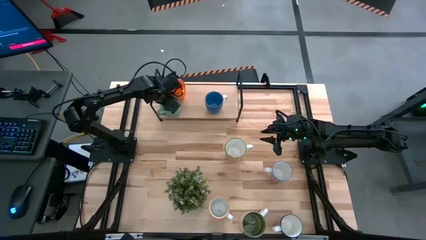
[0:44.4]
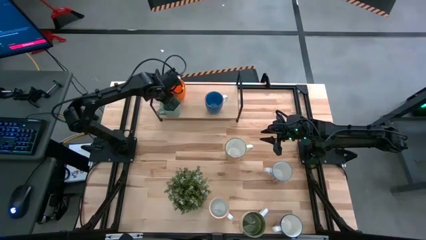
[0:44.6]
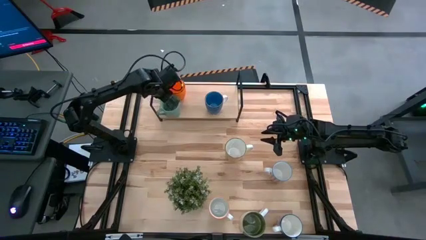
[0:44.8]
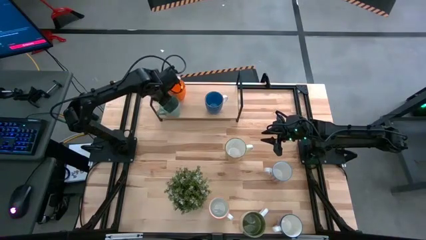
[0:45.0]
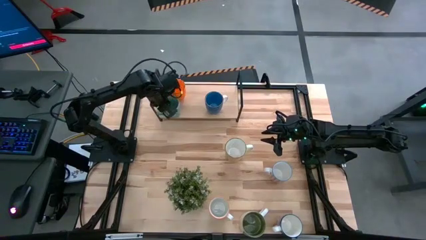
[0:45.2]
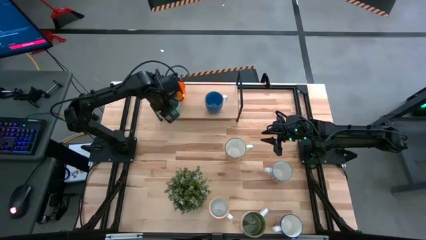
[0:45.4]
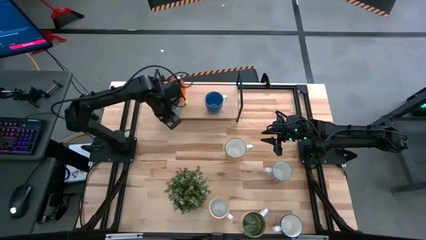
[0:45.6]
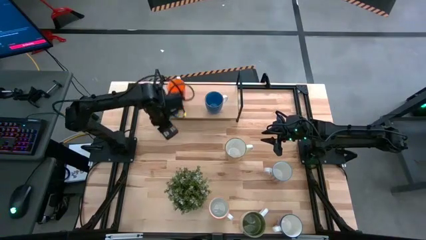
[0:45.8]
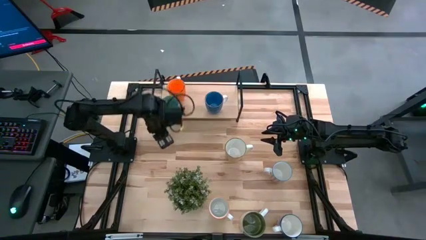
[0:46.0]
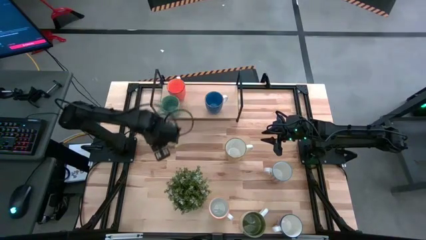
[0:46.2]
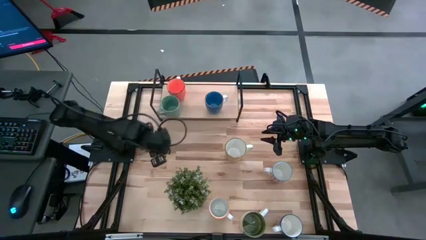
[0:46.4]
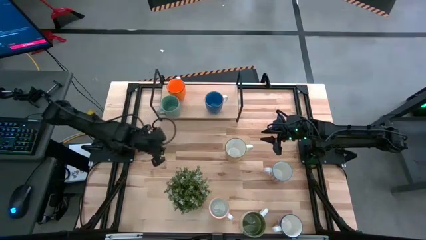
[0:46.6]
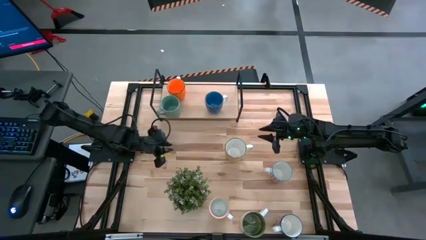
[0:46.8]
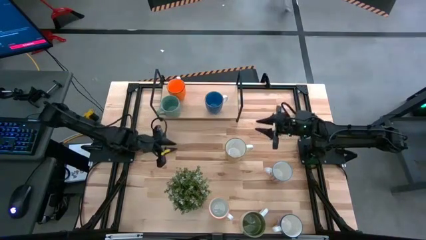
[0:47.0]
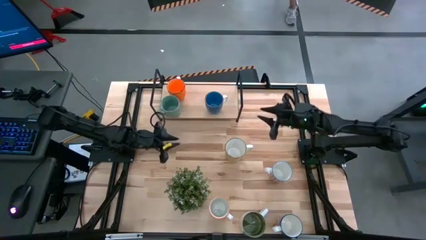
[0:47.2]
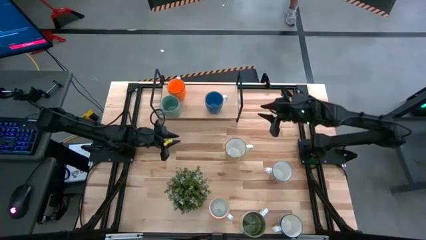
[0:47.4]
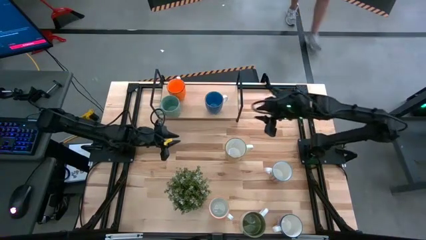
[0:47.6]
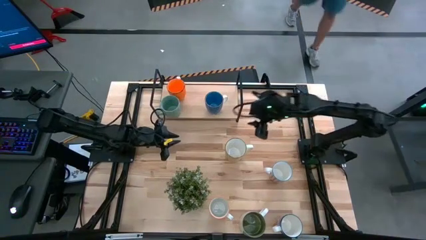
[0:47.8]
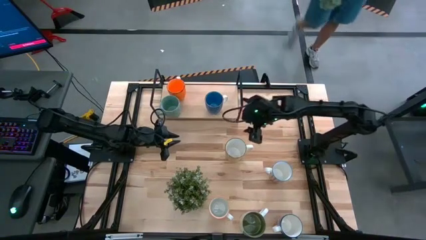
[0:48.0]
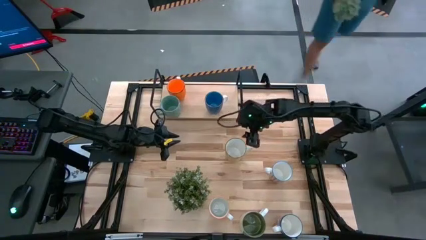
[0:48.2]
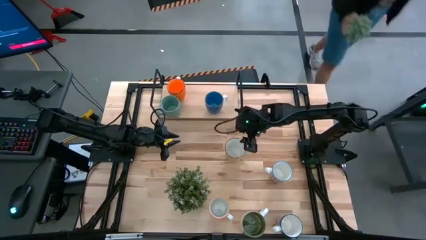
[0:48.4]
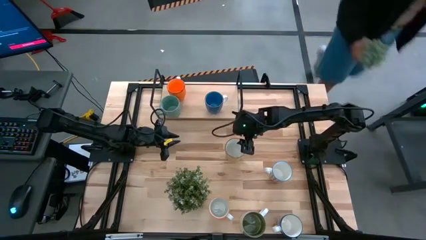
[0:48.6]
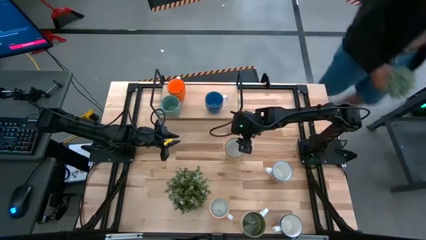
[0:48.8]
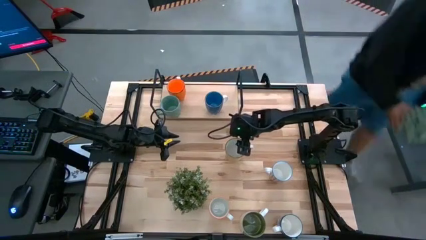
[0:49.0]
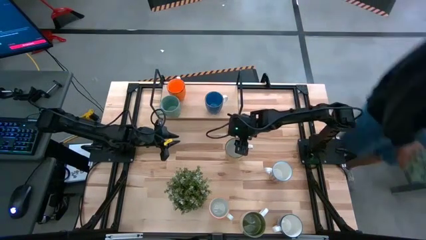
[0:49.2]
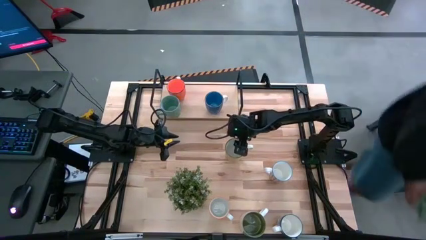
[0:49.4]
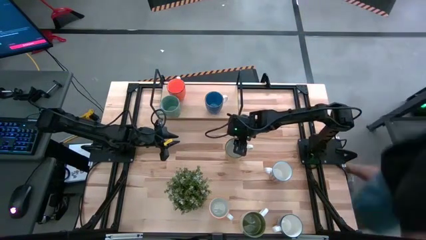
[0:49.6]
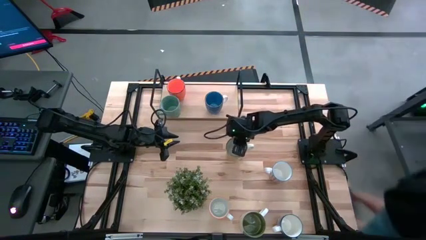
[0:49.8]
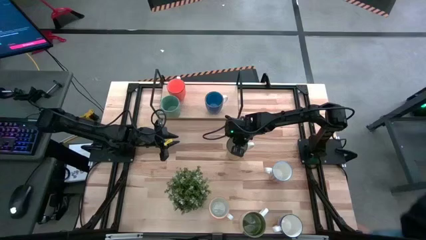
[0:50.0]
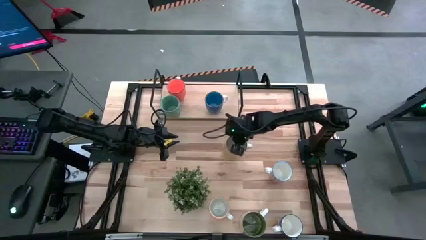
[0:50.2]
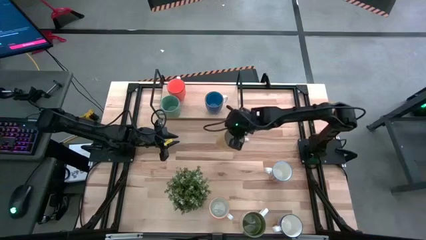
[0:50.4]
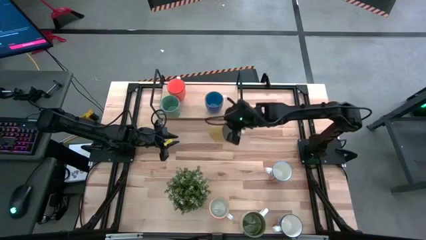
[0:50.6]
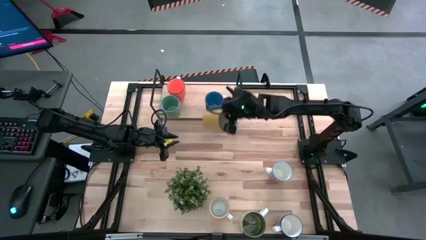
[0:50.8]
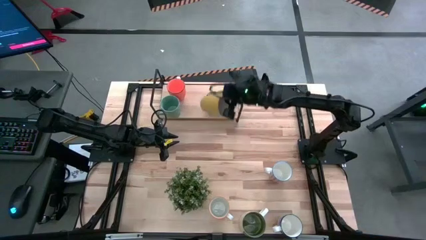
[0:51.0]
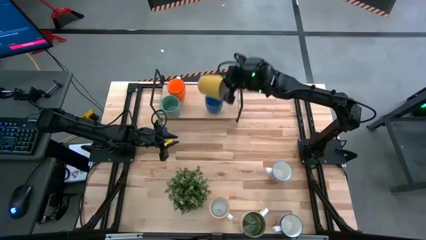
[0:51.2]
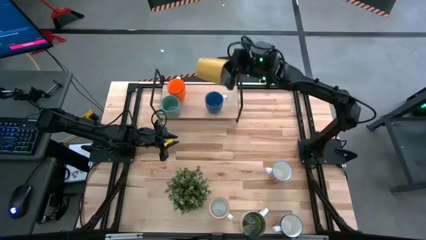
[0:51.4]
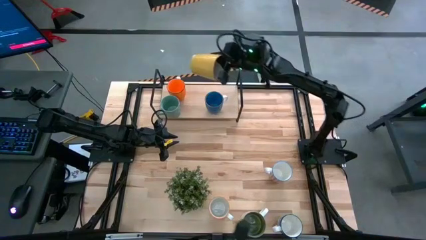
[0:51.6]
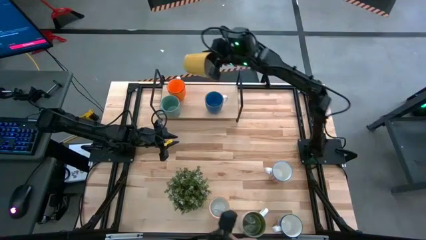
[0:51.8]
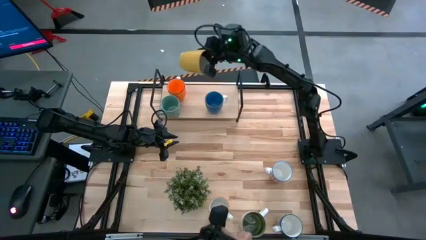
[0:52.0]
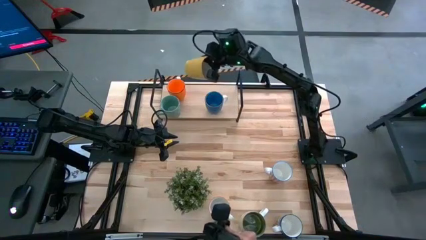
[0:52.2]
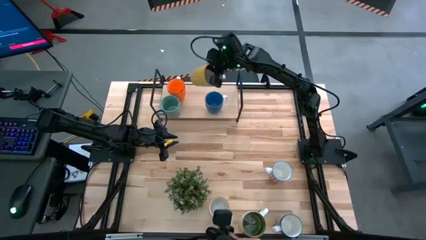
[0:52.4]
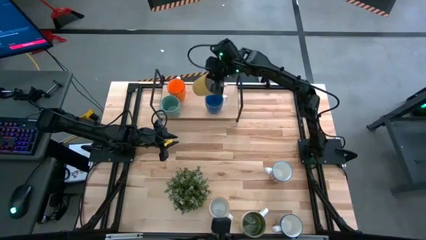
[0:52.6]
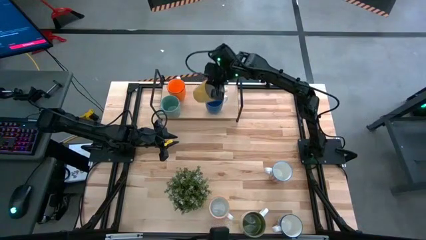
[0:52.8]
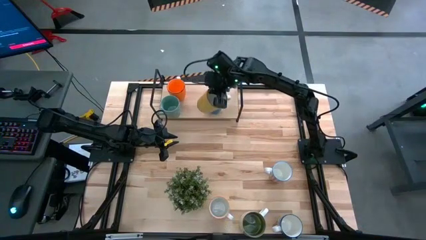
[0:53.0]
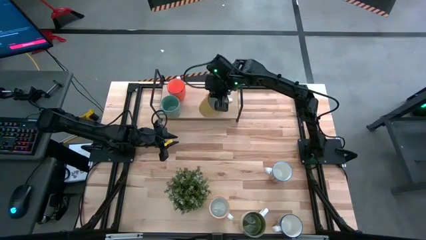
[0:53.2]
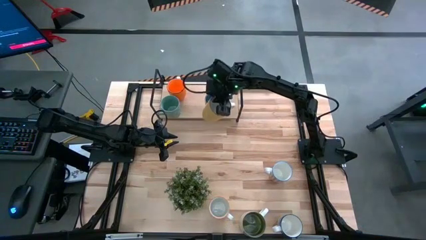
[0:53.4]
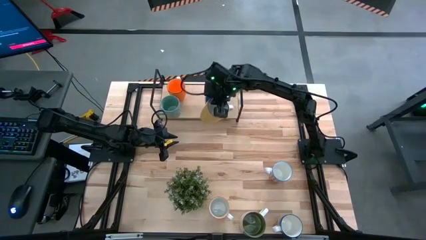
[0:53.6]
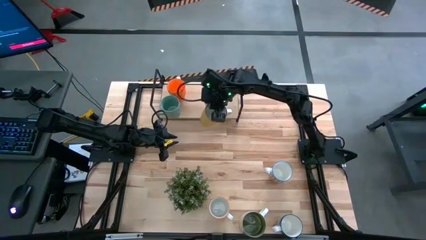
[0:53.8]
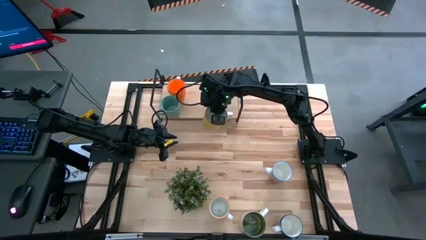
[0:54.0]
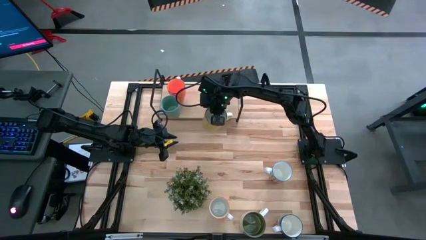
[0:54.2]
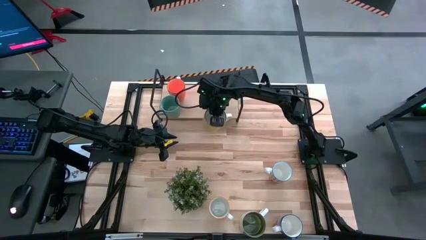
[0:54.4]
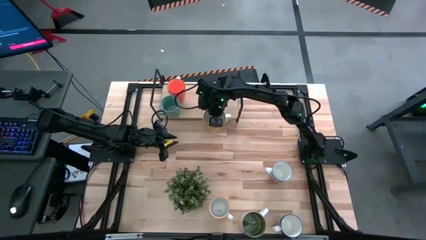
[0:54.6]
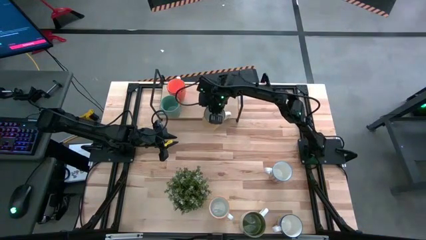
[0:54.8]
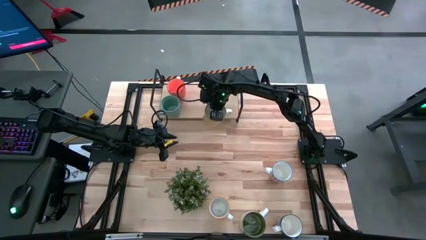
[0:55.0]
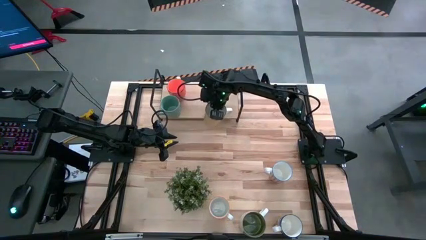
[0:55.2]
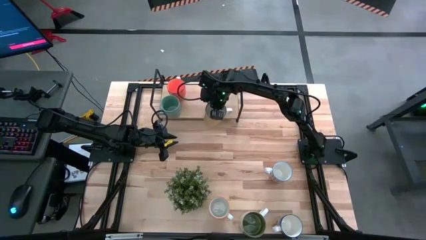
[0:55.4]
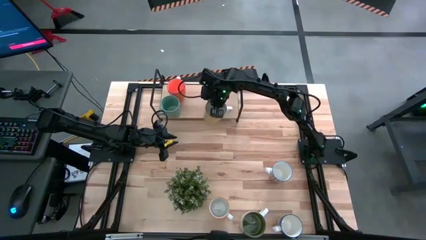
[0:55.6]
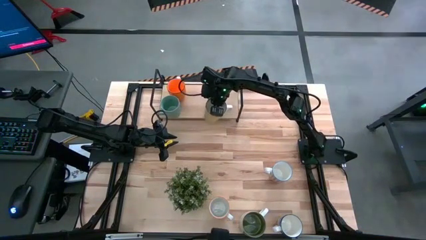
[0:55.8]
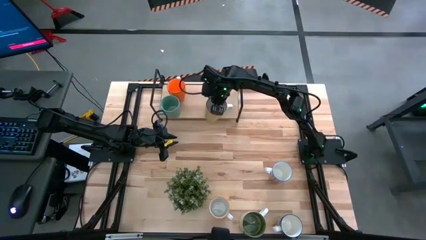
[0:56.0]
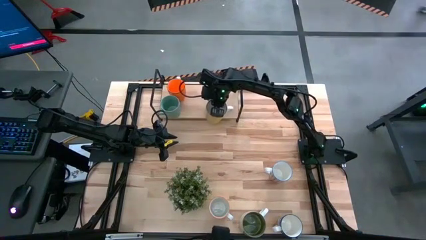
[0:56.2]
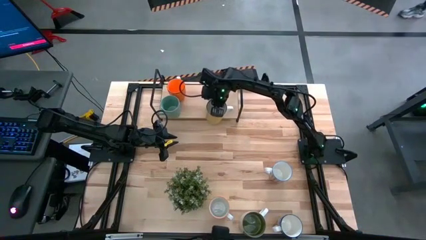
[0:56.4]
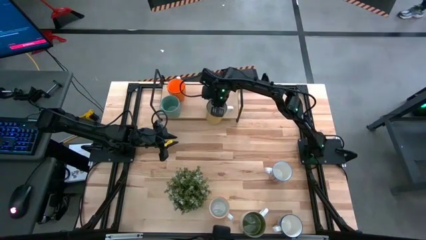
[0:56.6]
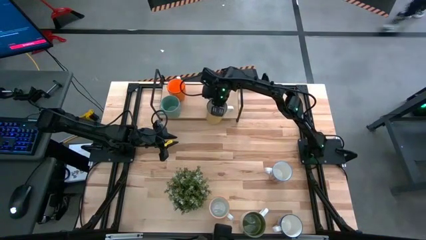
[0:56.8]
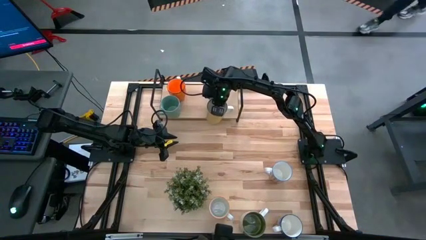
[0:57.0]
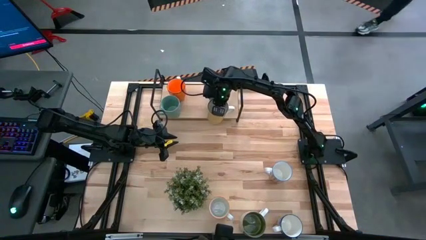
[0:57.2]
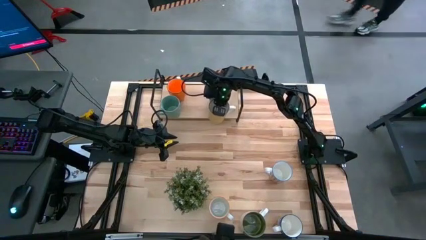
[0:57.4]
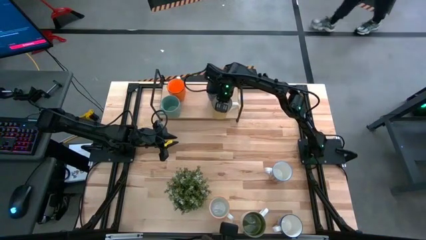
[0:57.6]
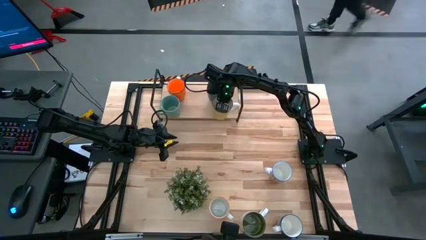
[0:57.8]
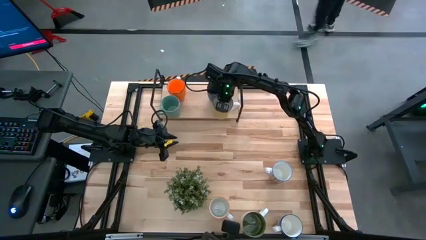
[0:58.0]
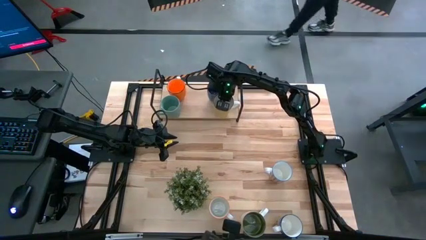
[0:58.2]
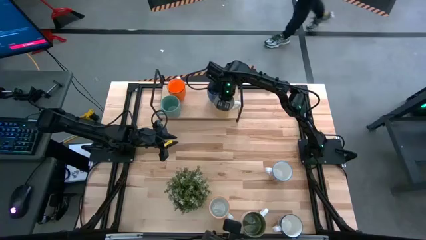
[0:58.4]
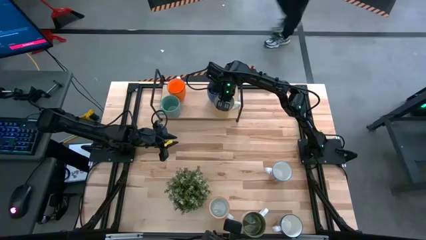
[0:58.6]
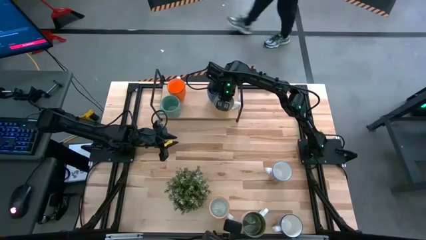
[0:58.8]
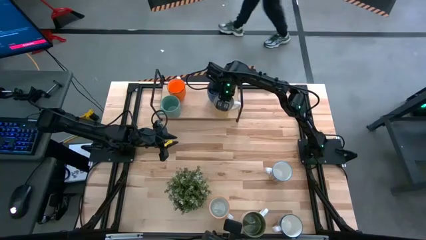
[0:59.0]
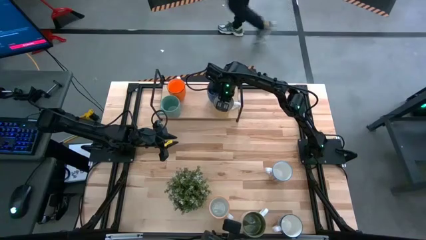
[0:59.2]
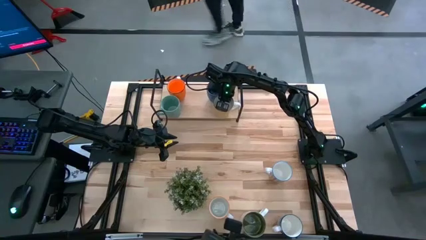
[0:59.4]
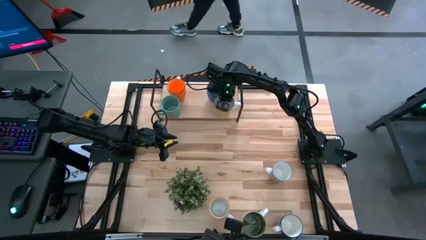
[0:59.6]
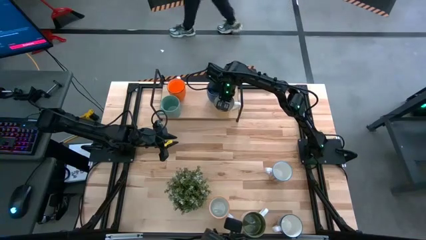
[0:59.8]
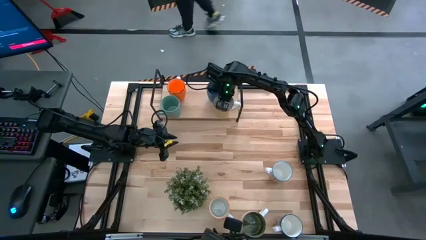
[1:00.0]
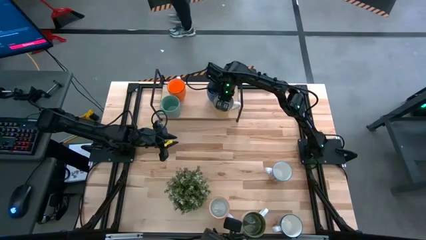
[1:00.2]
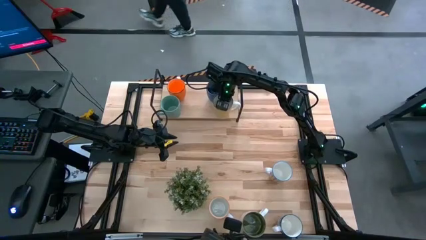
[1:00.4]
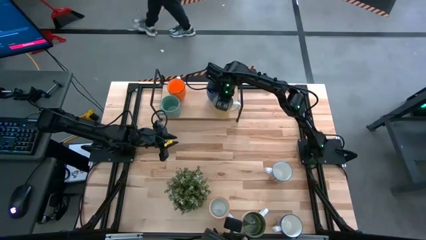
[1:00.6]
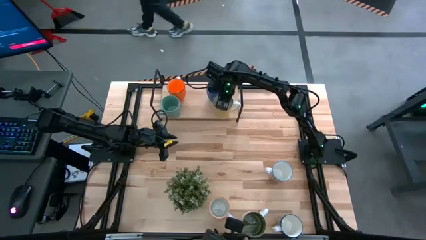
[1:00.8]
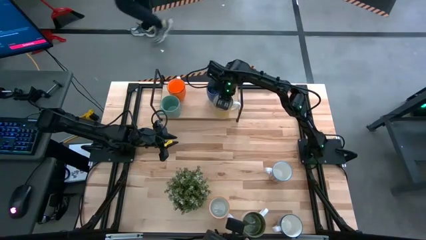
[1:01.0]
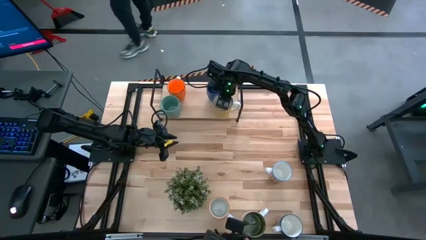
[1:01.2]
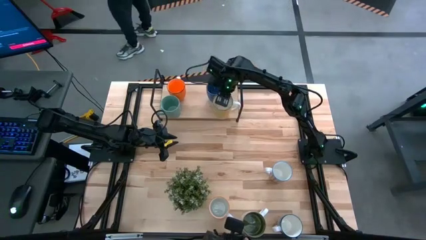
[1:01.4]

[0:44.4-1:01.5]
Task: Place coffee mugs
Put the yellow mug on the shelf
